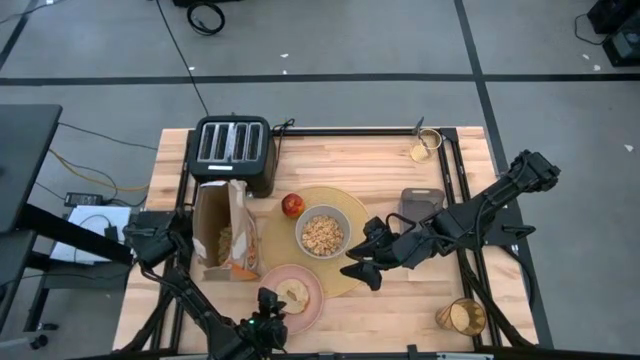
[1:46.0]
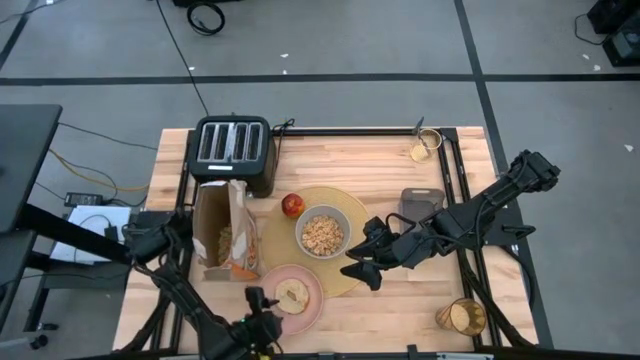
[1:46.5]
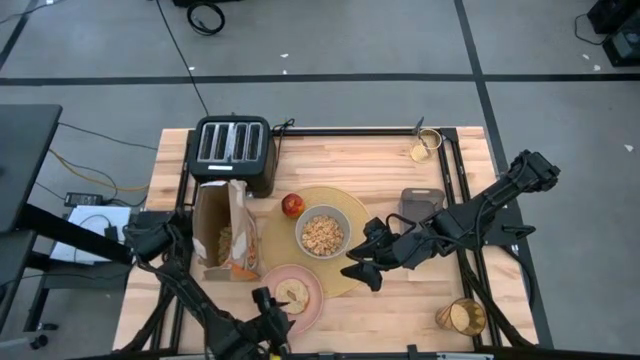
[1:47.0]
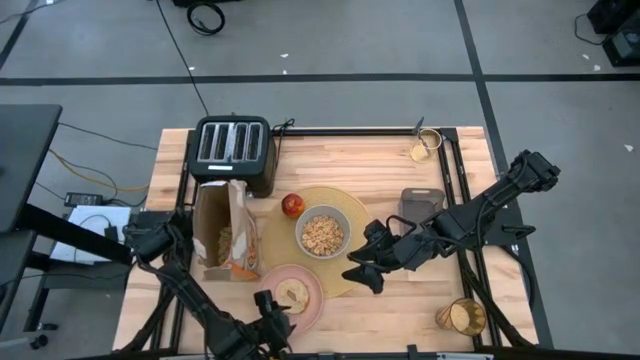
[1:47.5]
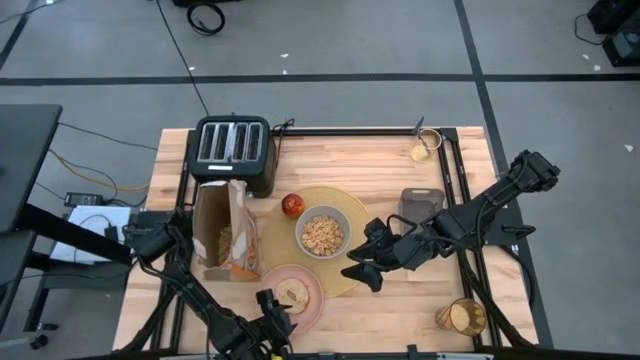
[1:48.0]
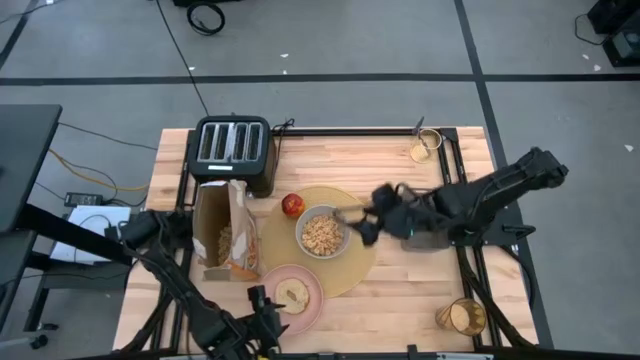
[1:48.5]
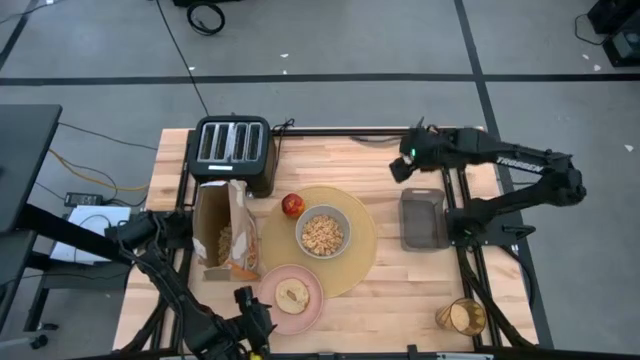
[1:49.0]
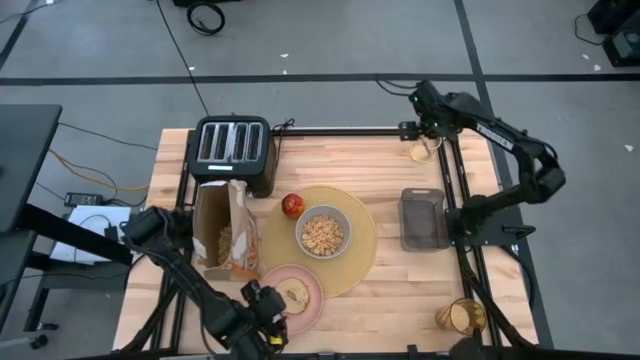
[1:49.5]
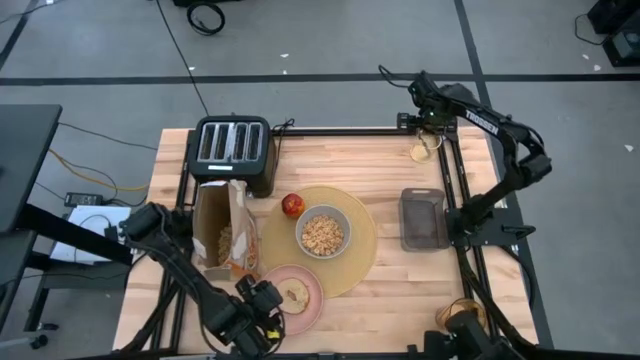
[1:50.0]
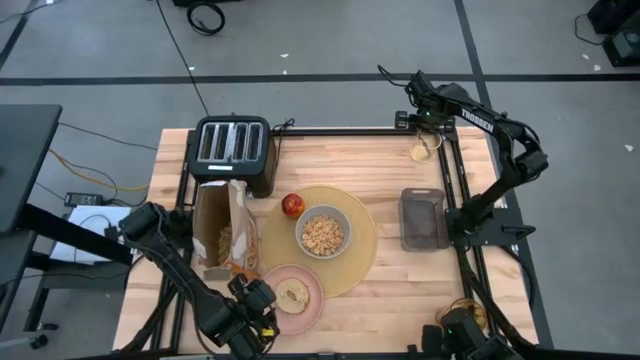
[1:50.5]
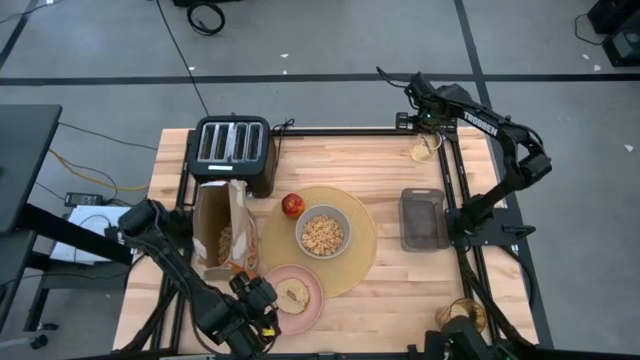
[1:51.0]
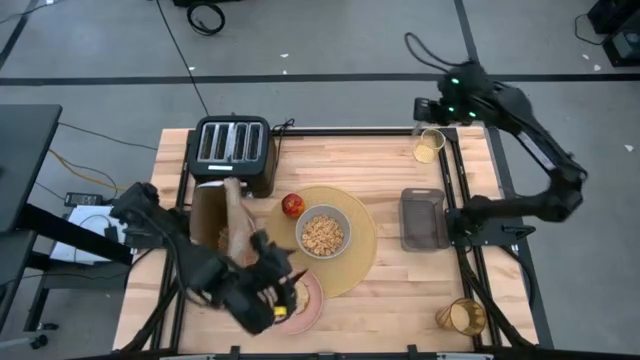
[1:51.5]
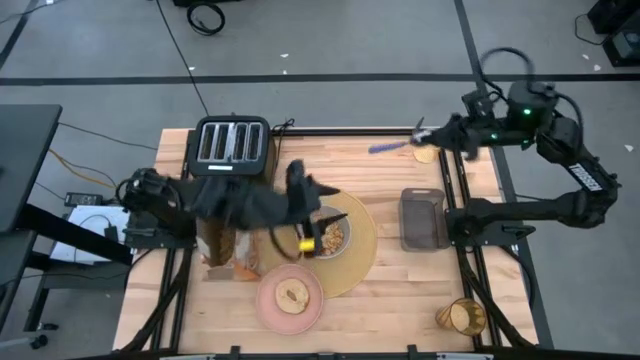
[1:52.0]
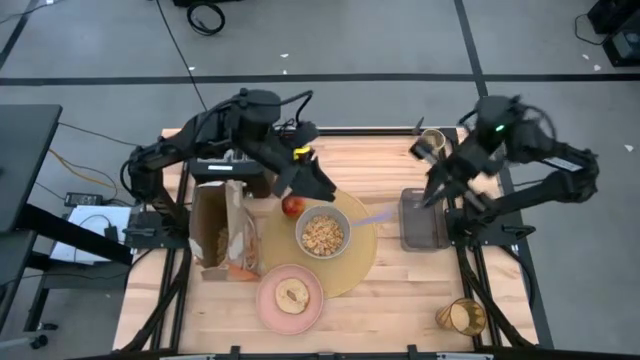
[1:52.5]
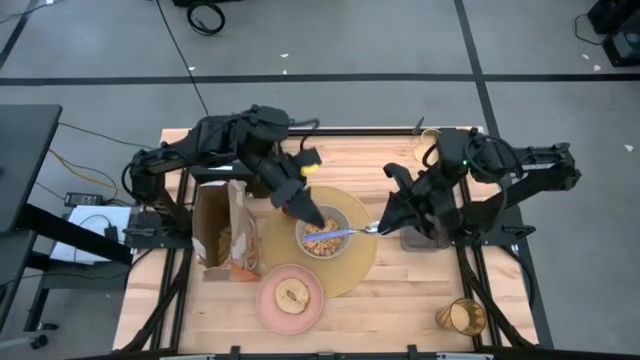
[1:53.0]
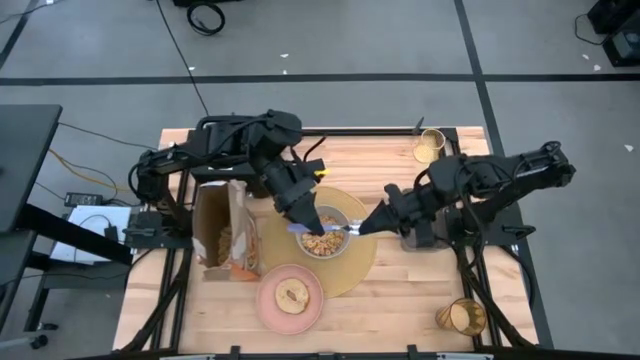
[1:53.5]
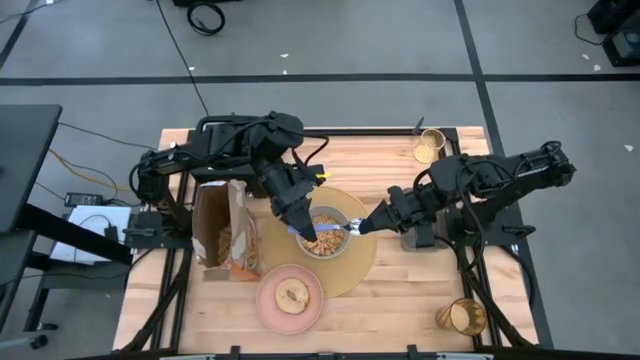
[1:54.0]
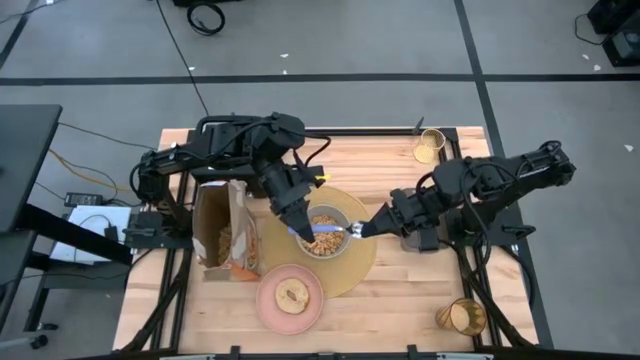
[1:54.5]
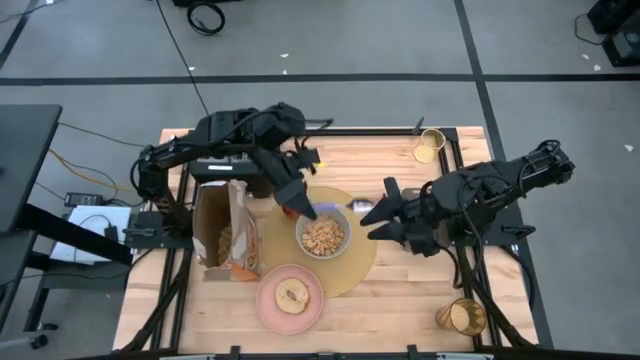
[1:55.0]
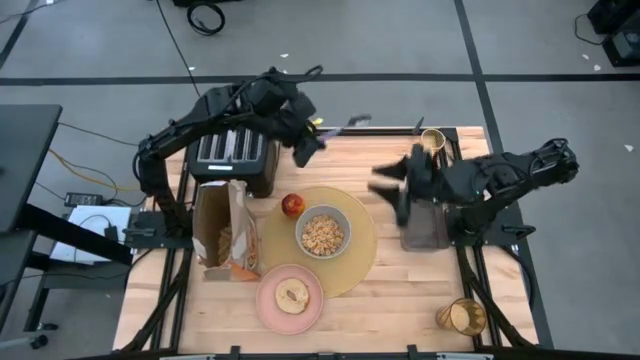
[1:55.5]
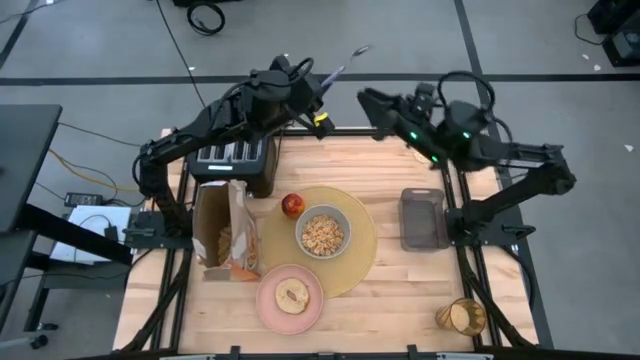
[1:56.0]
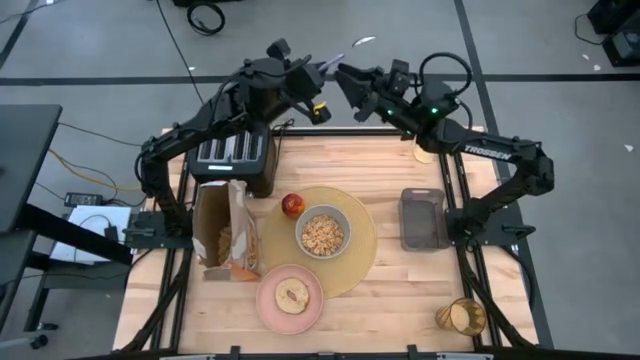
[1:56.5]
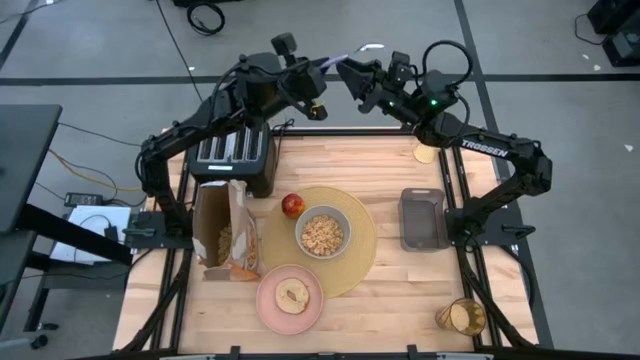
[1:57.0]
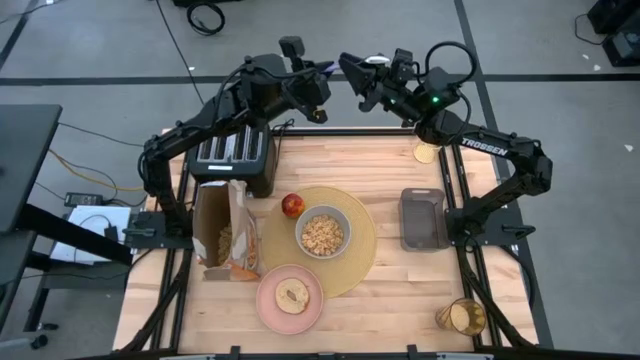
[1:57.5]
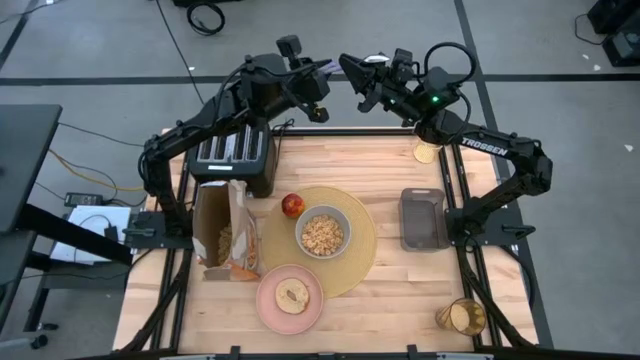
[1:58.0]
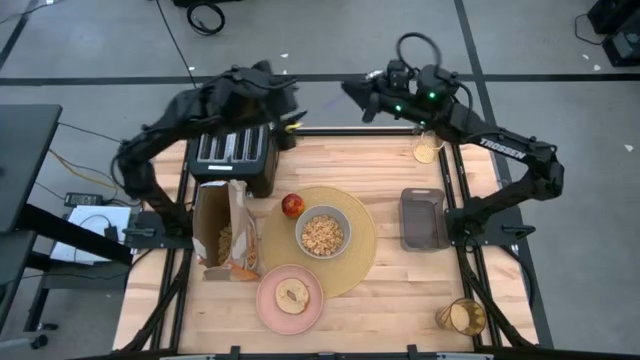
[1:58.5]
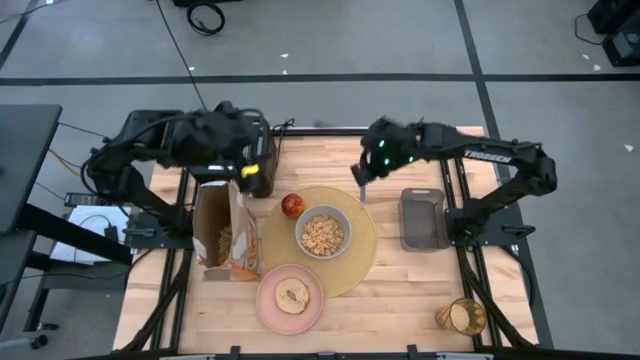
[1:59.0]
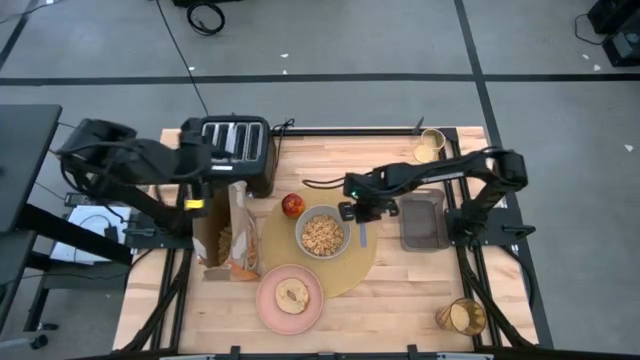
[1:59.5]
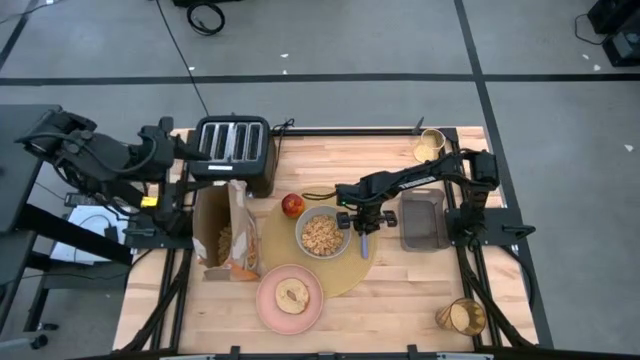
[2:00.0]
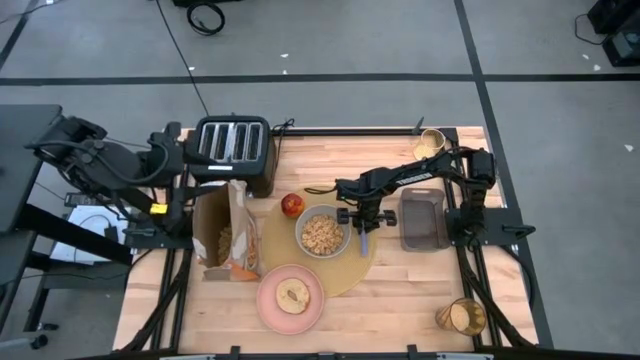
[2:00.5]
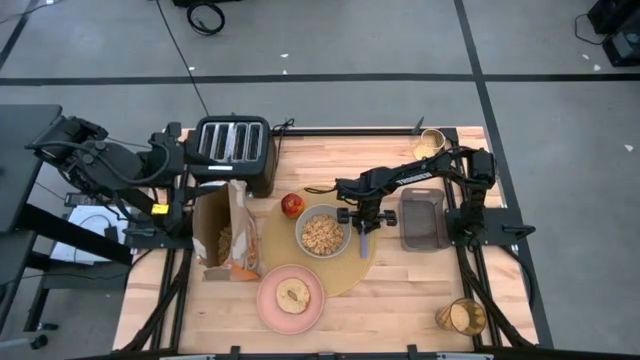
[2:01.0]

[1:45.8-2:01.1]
Task: Arrange a breakfast setting
Put the purple spoon to the right of the gray bowl on the yellow placemat

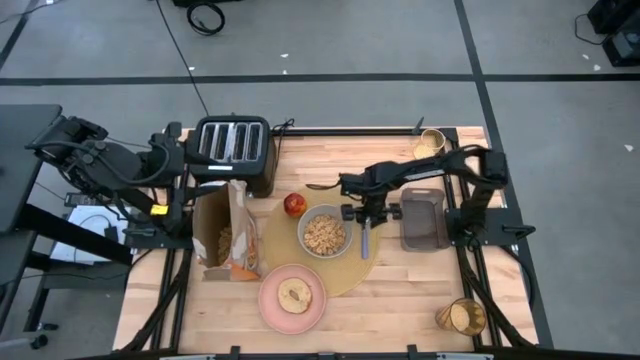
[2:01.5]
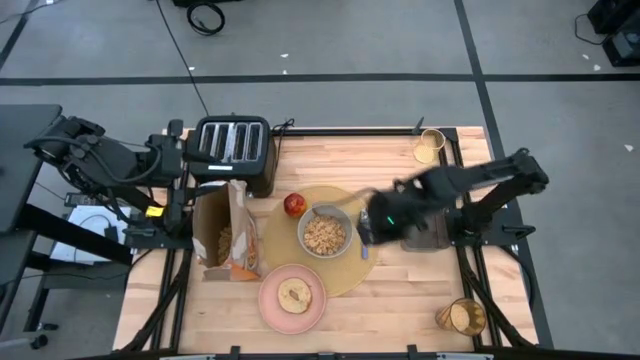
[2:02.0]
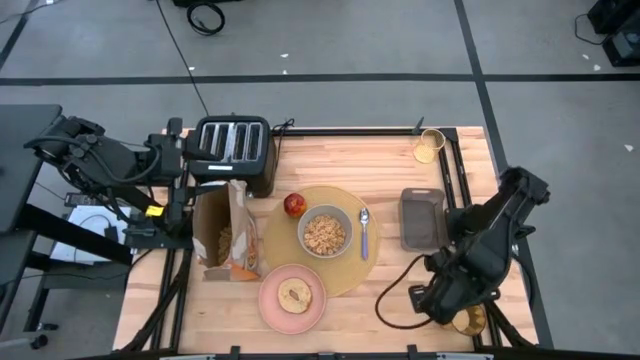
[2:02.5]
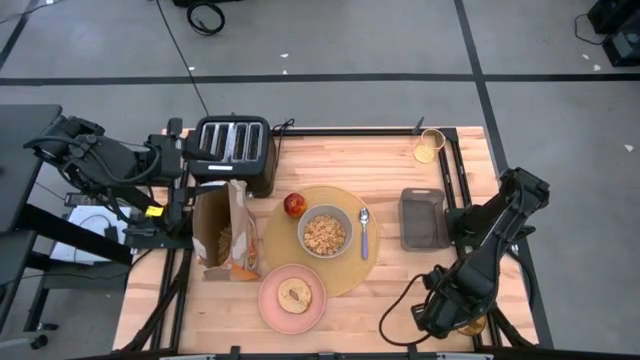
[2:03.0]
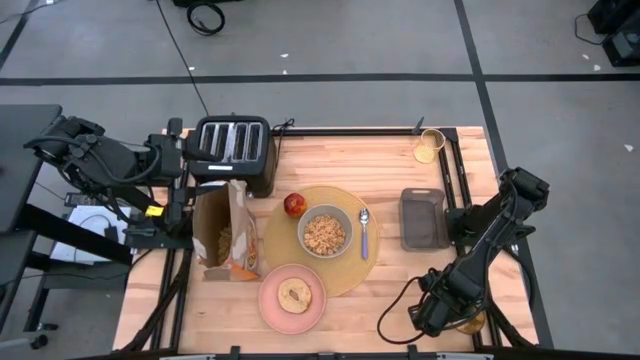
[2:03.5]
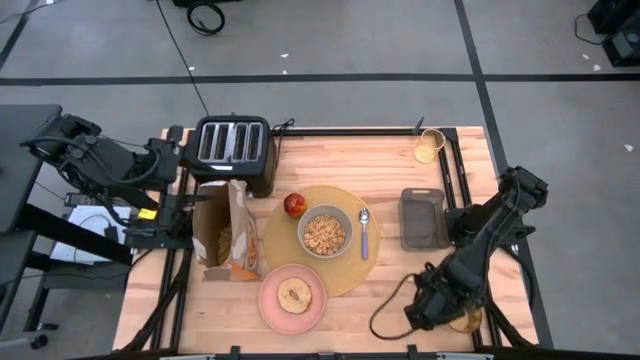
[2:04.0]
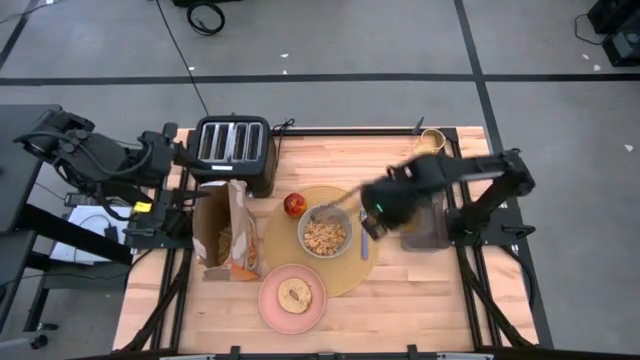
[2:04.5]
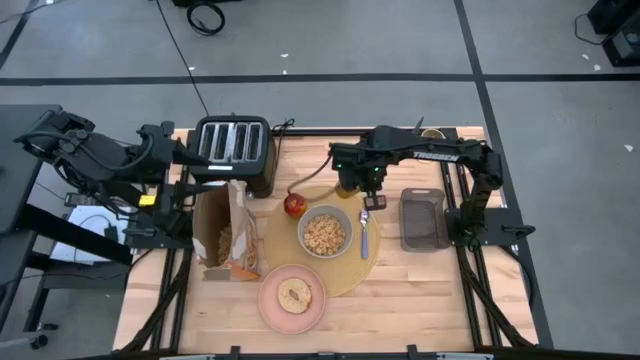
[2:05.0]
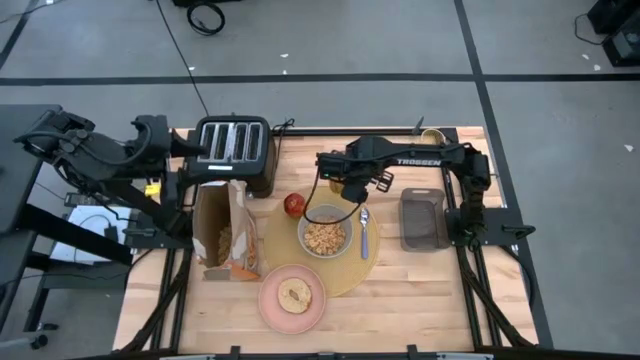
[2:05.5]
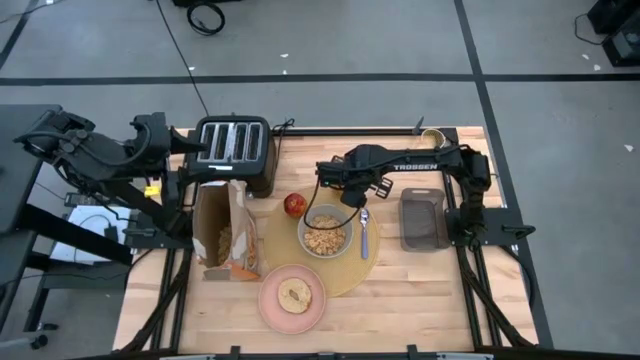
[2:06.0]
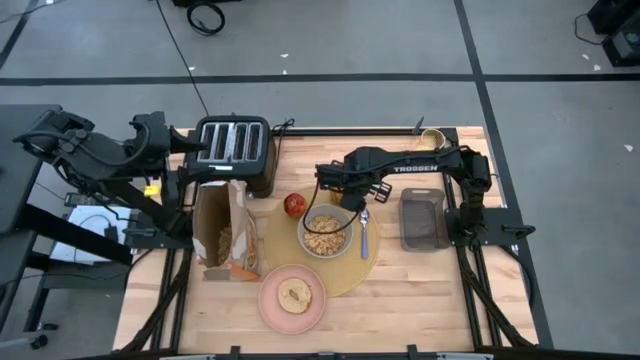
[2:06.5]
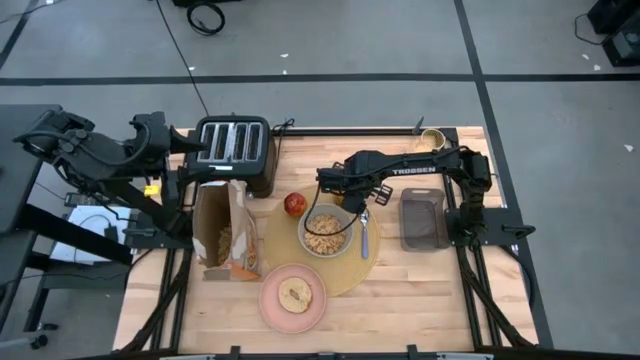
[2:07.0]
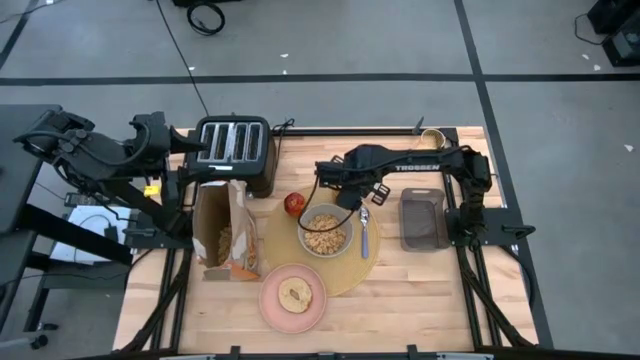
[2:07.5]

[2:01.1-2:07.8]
Put the yellow transparent cup to the top right of the gray bowl on the yellow placemat
